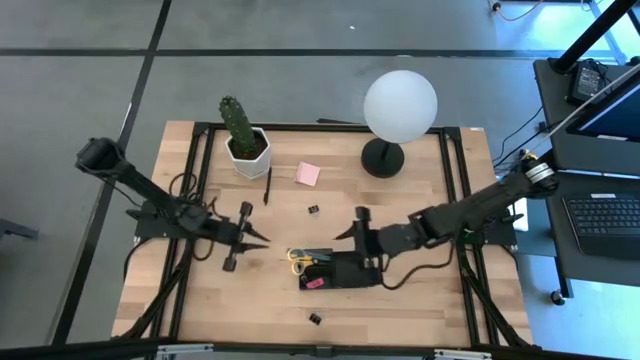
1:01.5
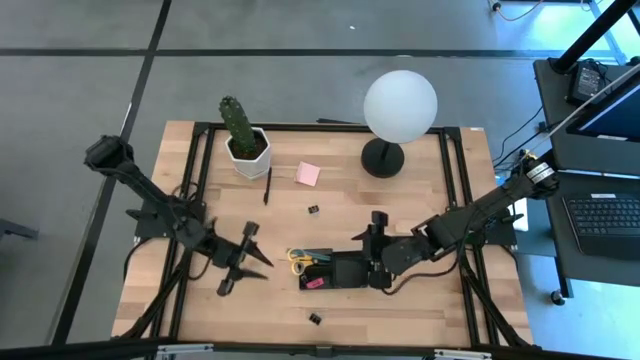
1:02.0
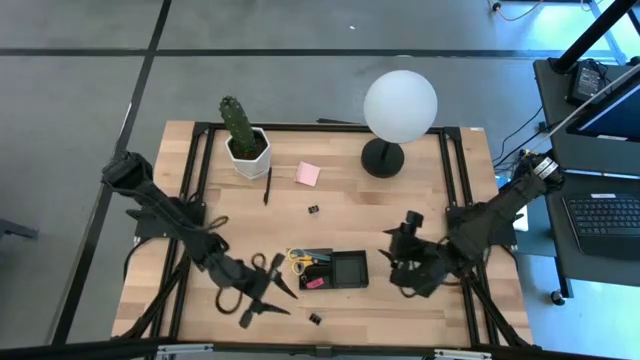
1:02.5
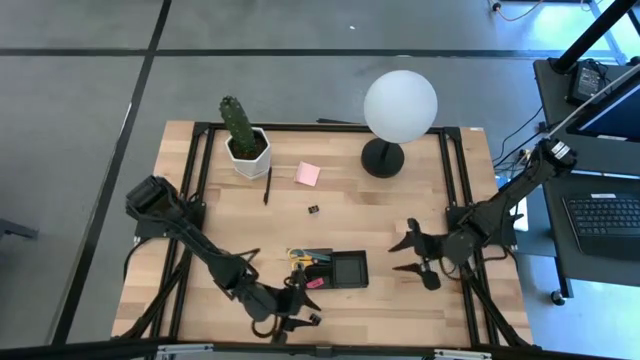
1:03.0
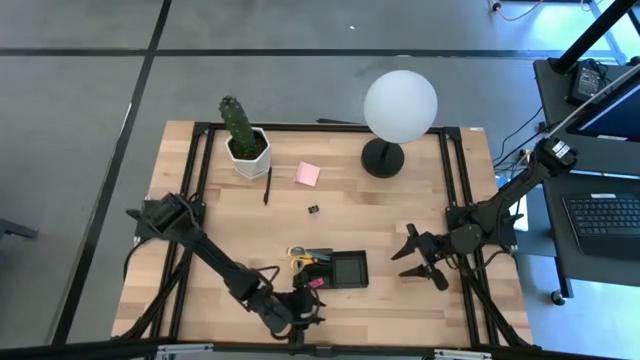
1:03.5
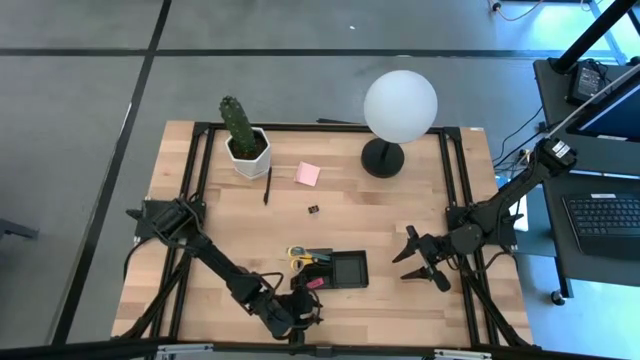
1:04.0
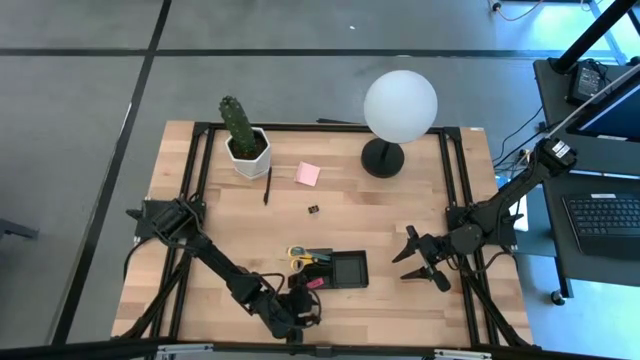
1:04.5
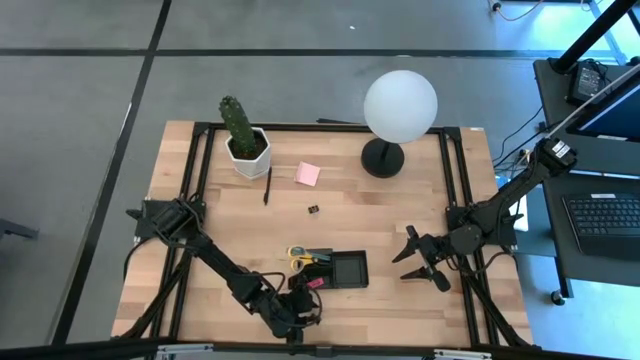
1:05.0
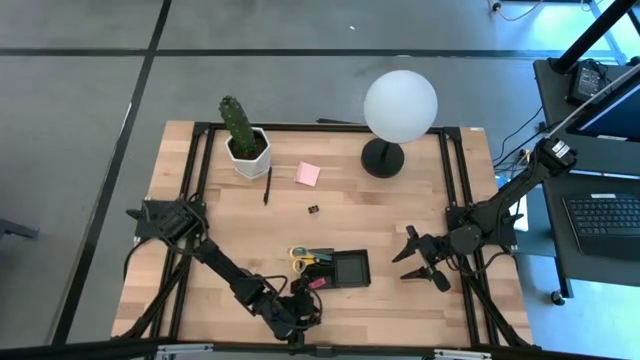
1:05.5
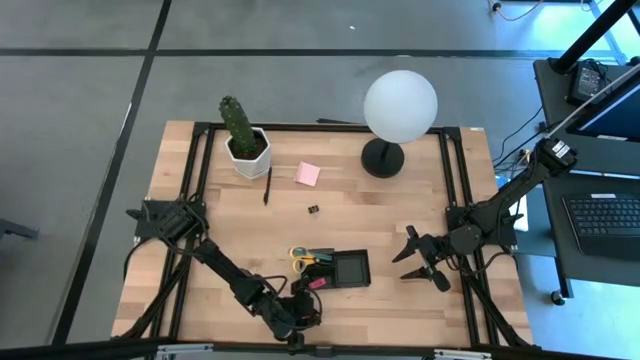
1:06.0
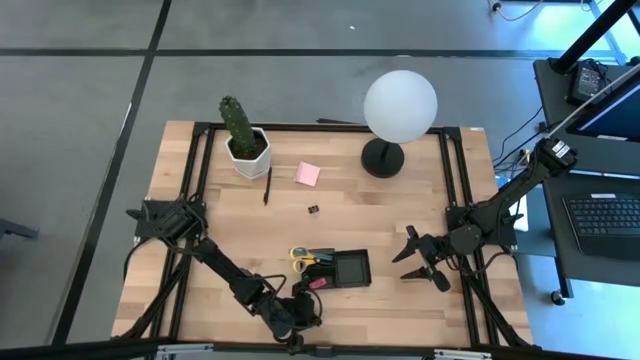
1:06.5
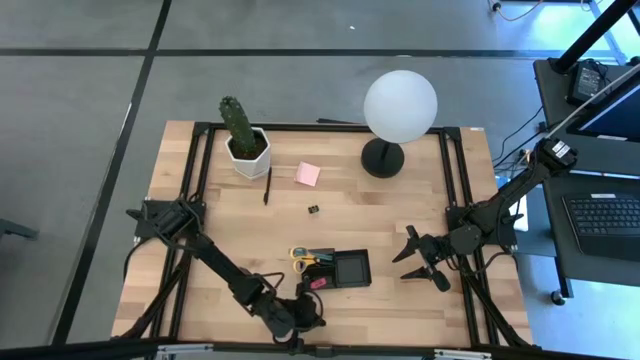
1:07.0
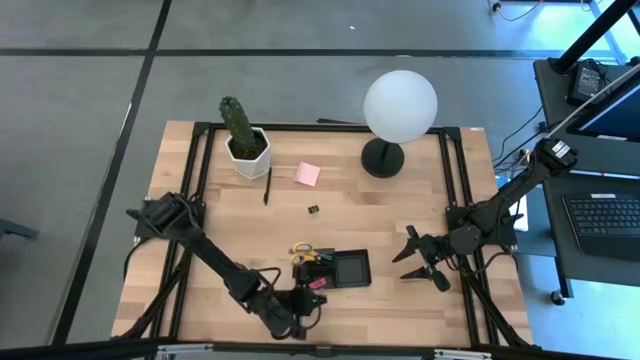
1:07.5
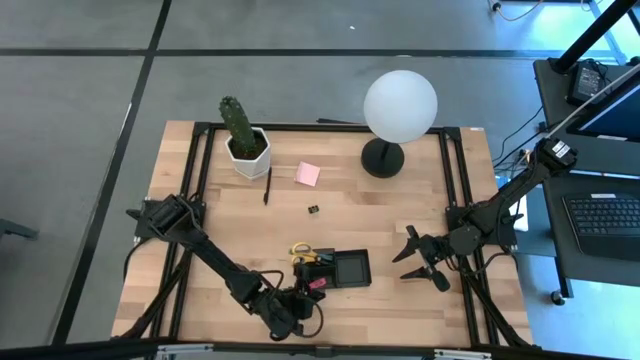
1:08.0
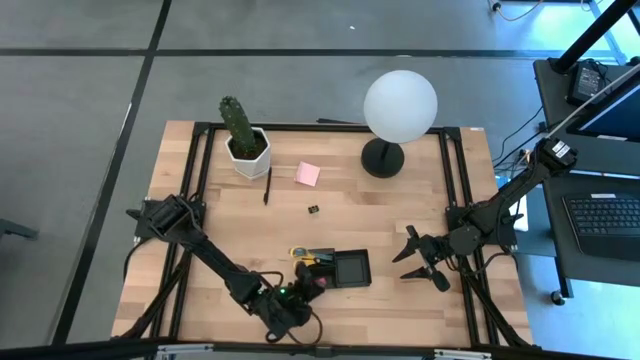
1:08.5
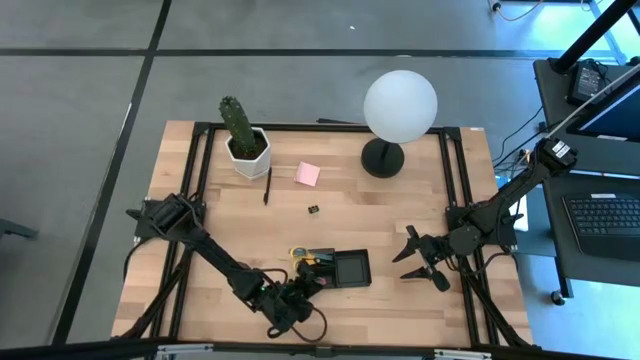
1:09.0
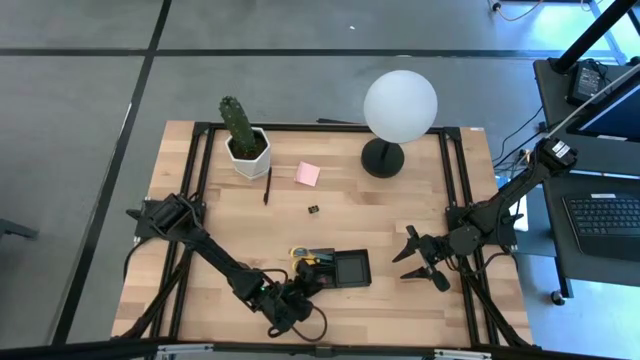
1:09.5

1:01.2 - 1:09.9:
Task: Pick and place office supplies into organizer
Put the bottom black binder clip into the mesh desk organizer

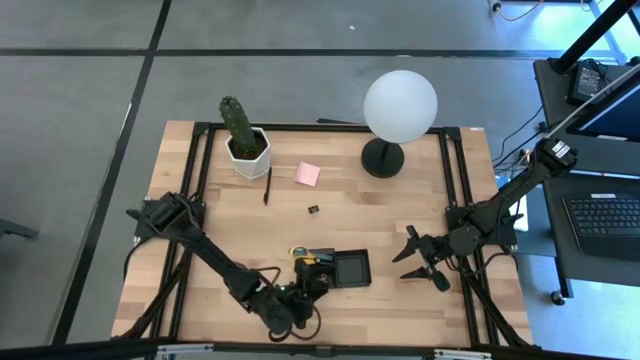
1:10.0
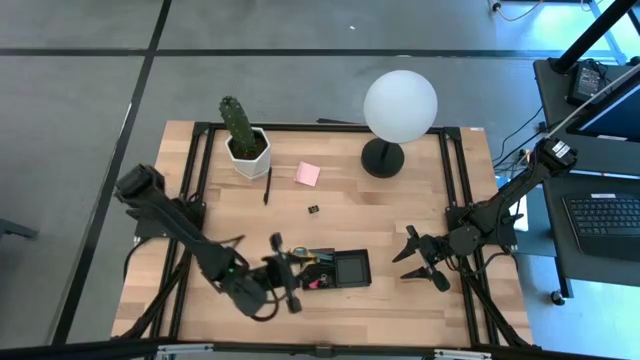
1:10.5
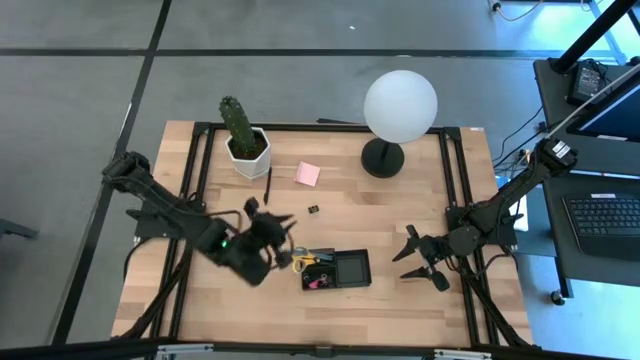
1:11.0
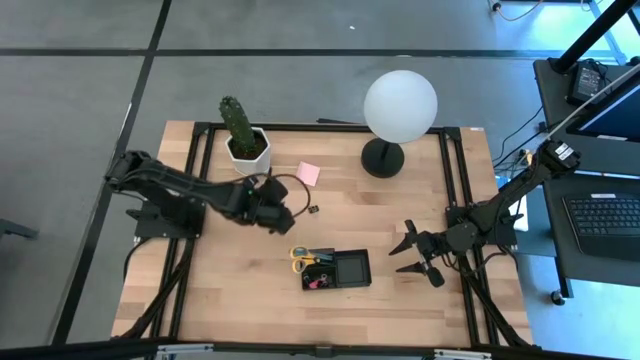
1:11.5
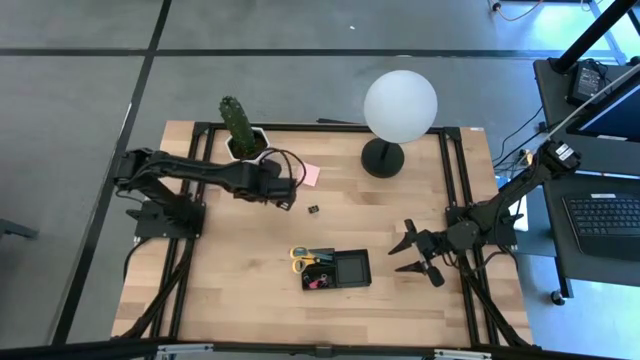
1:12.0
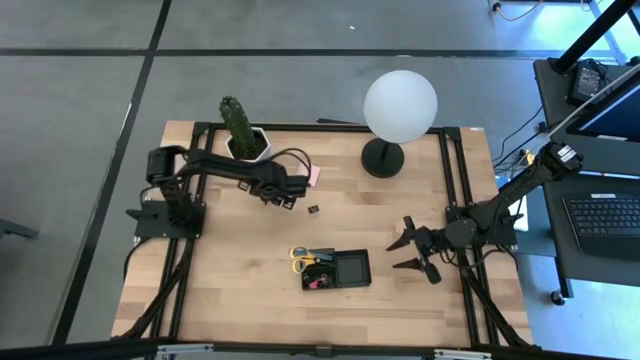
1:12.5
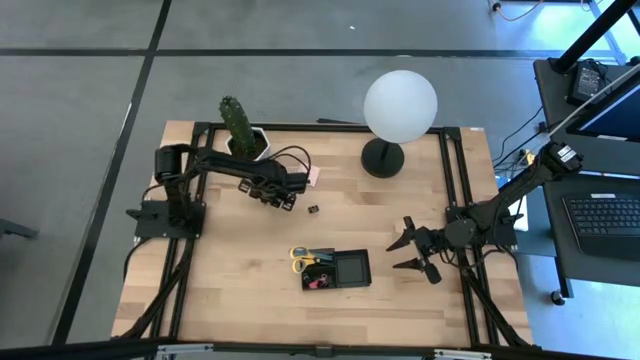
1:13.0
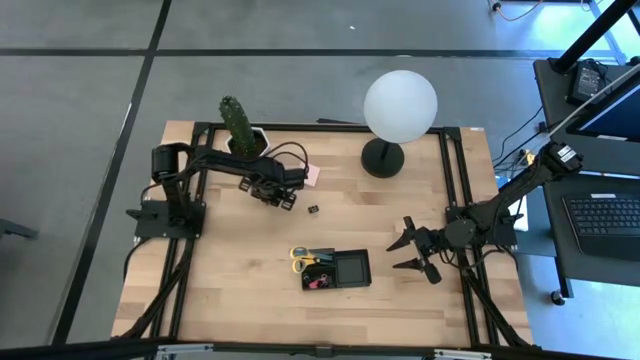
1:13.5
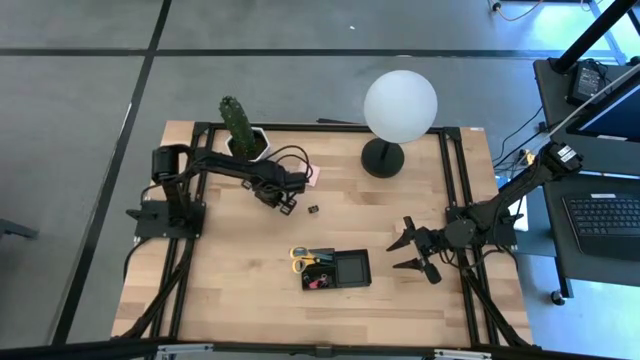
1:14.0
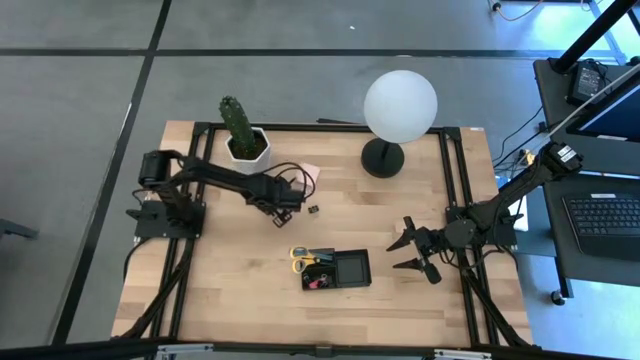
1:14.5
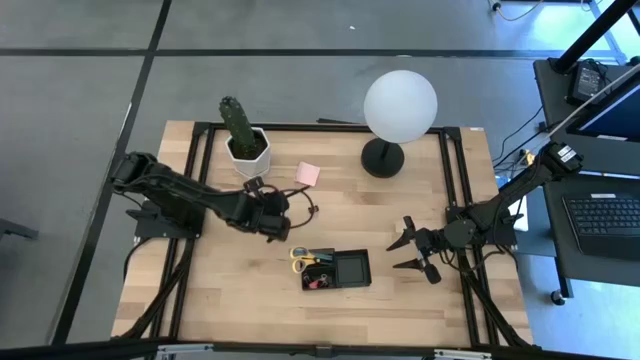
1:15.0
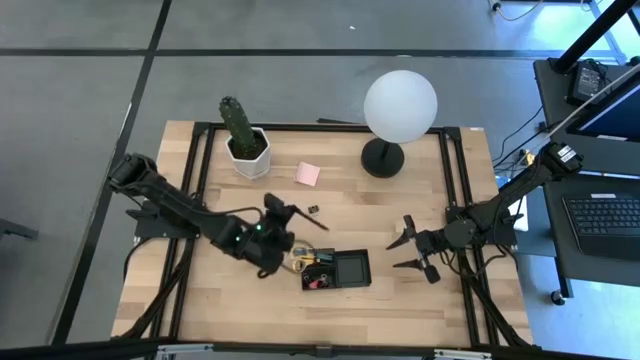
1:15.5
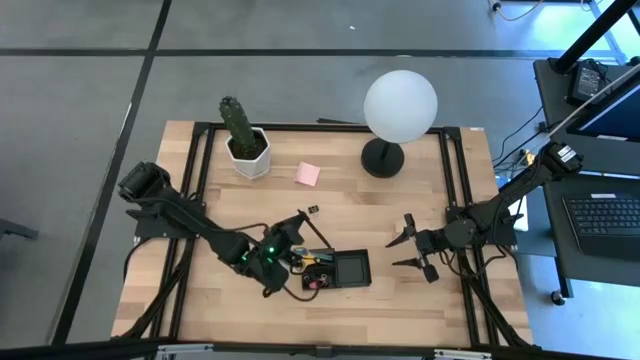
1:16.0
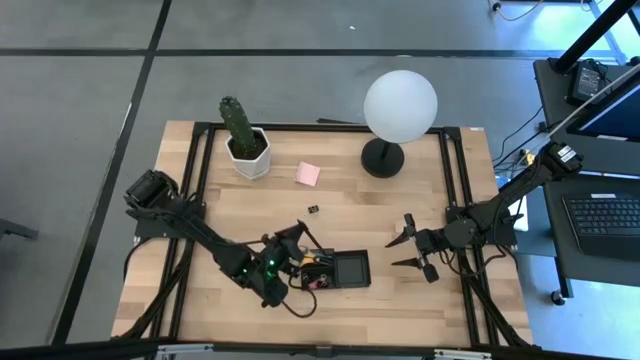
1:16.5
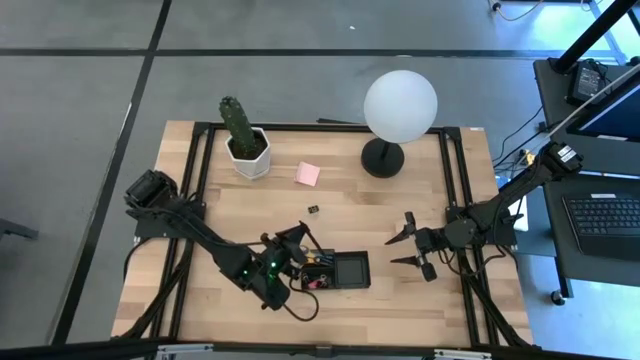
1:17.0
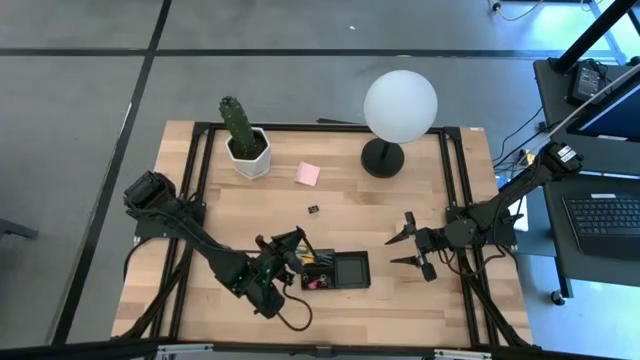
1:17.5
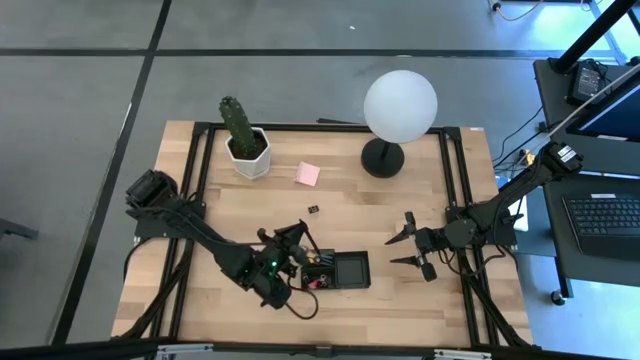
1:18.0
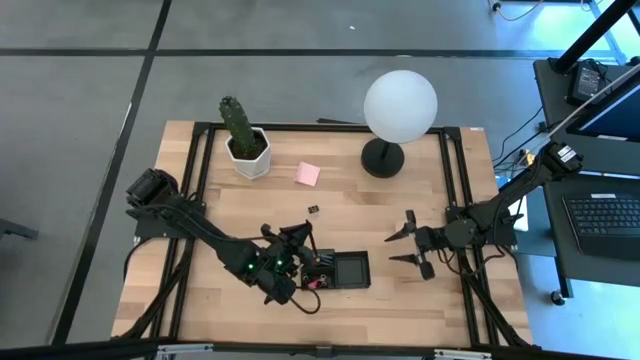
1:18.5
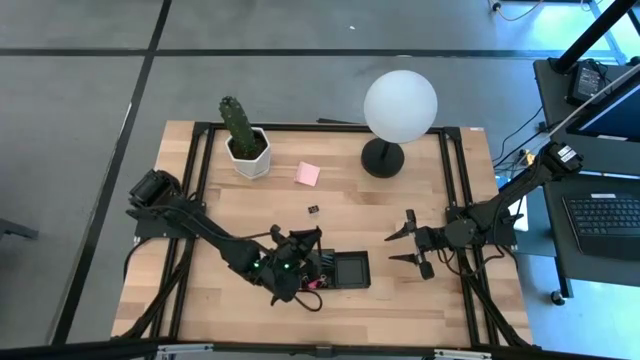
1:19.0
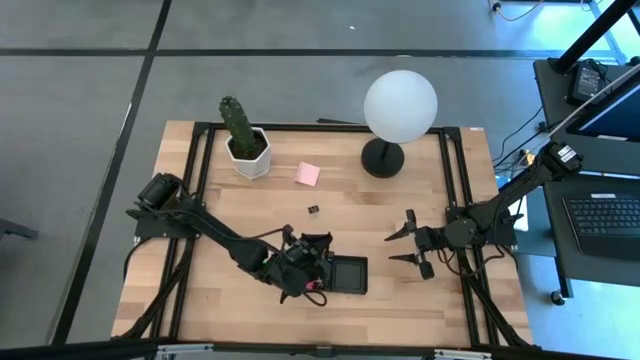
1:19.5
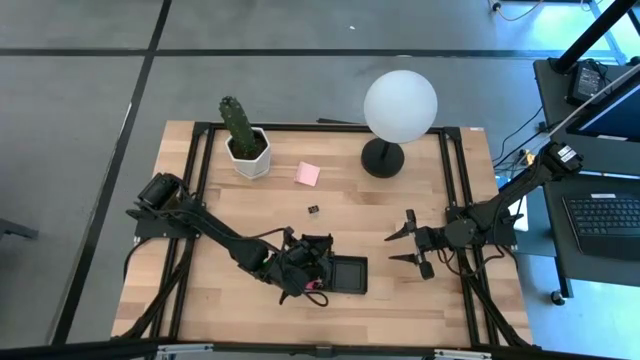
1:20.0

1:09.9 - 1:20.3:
Put the black pen into the mesh desk organizer

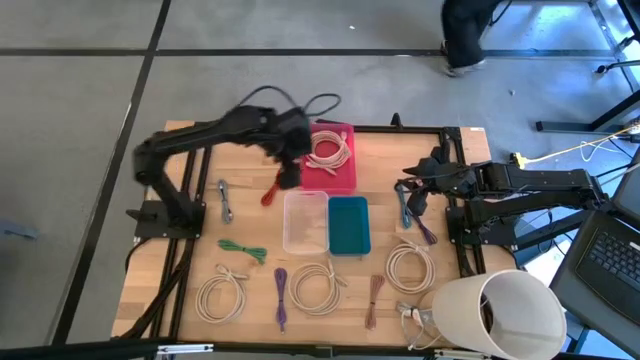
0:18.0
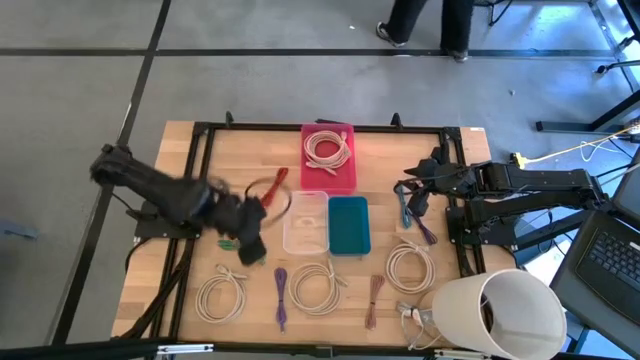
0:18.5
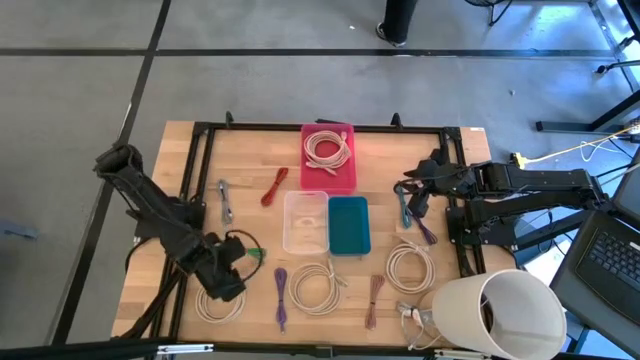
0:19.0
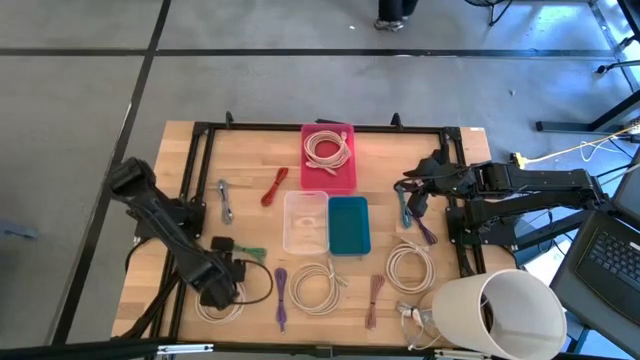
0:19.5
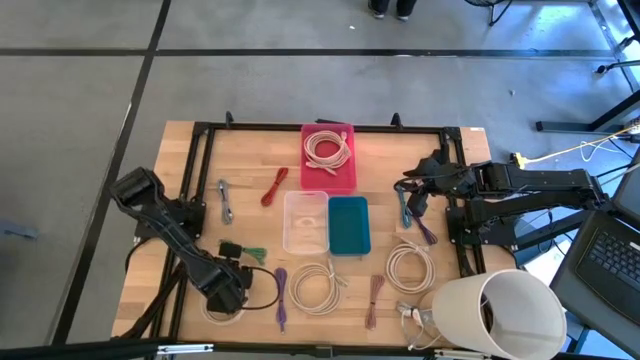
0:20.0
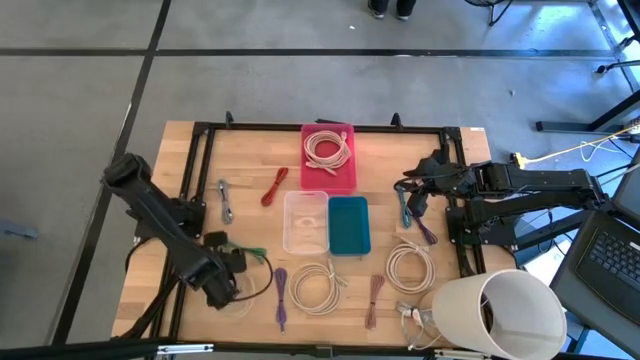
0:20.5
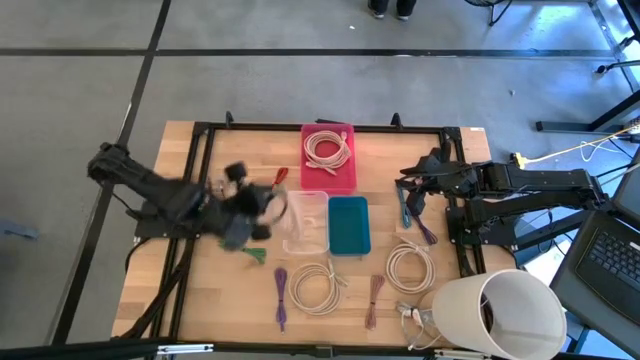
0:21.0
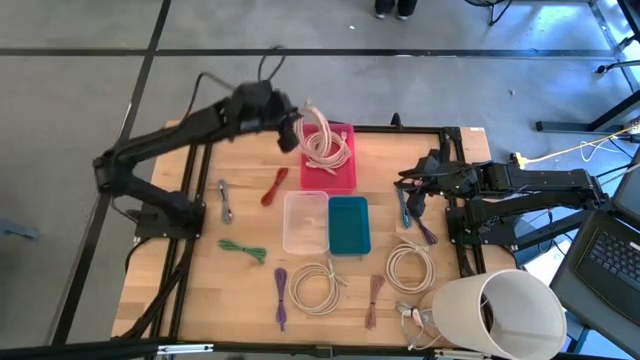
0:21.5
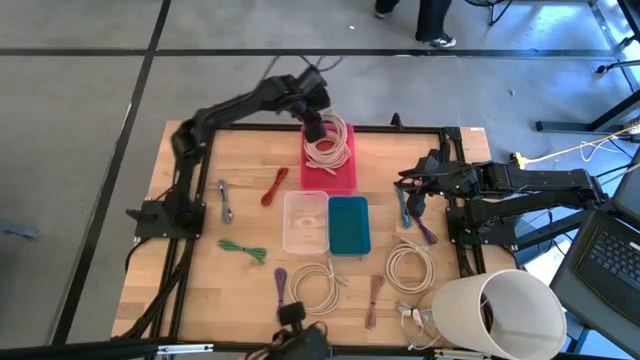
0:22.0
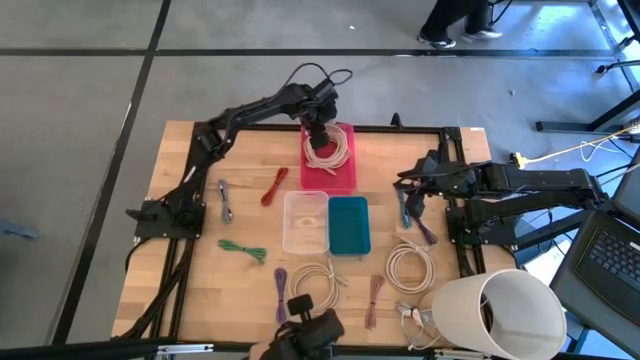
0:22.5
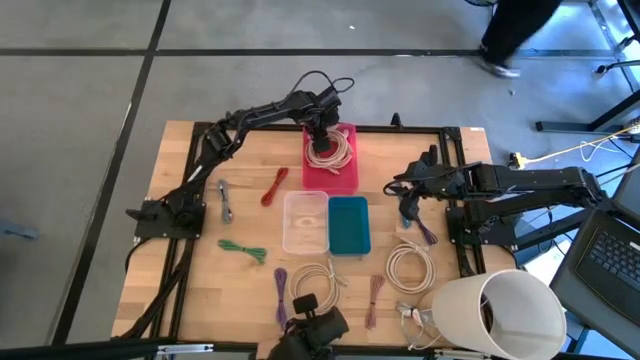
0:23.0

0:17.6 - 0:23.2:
Task: Pick & Place USB Port
Put the brown HDMI cable into the pink bin
